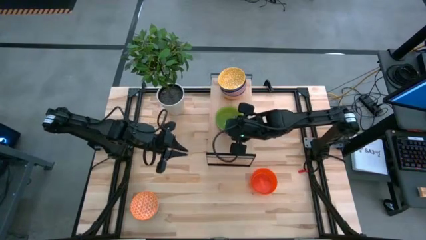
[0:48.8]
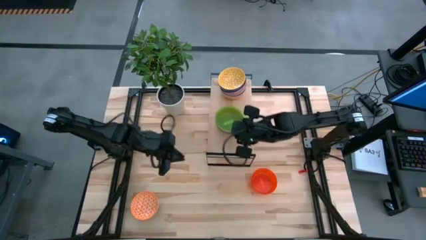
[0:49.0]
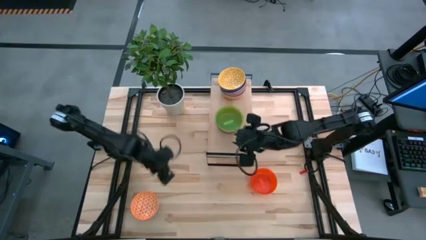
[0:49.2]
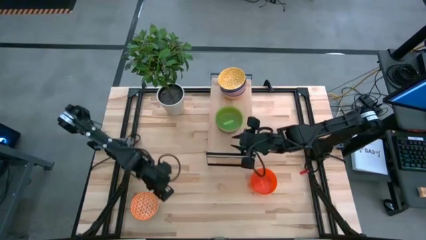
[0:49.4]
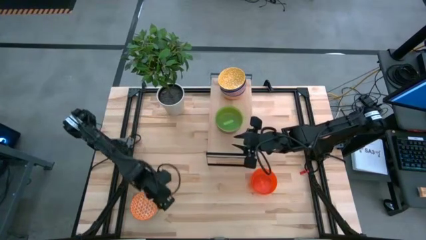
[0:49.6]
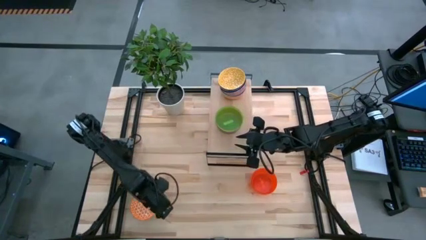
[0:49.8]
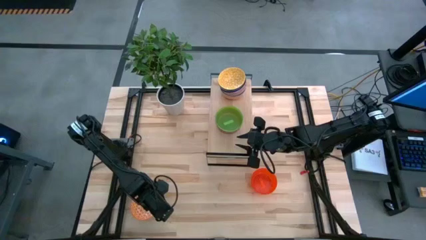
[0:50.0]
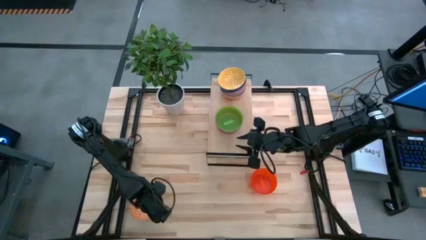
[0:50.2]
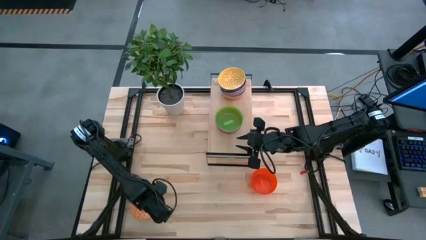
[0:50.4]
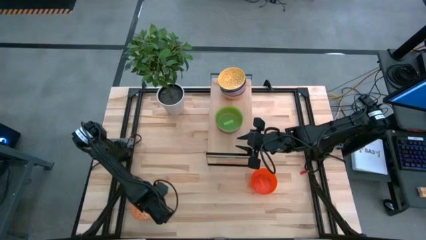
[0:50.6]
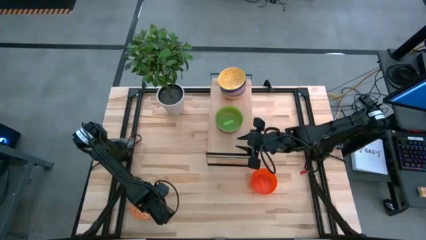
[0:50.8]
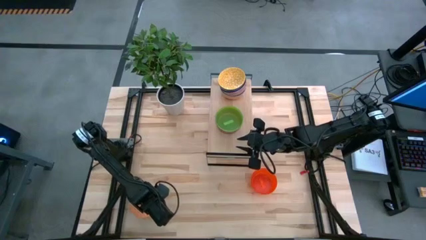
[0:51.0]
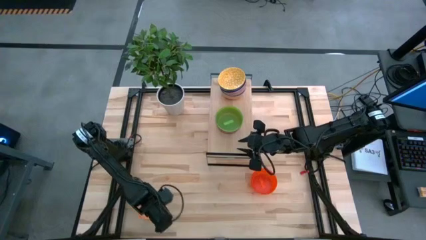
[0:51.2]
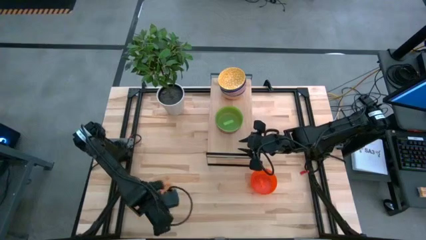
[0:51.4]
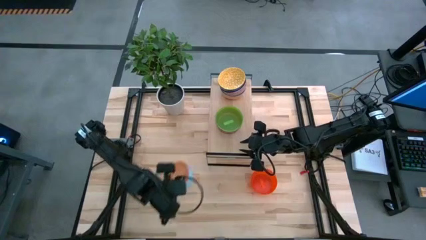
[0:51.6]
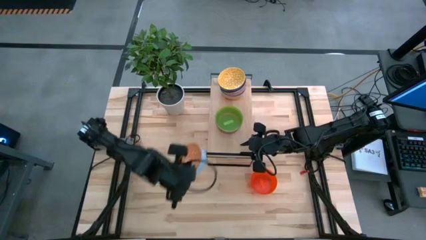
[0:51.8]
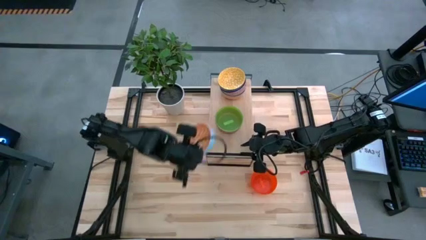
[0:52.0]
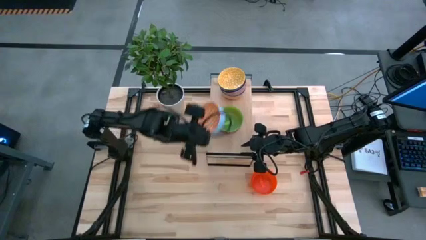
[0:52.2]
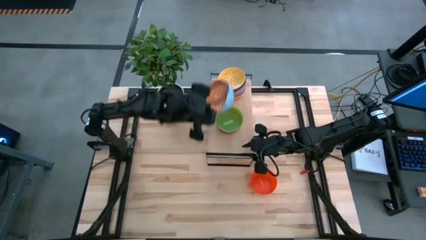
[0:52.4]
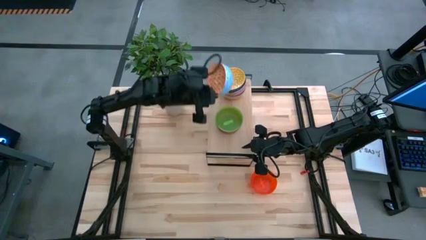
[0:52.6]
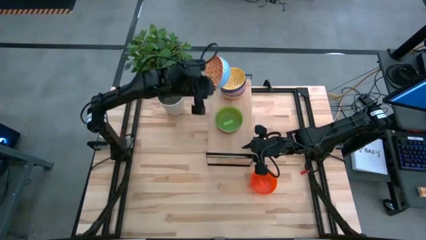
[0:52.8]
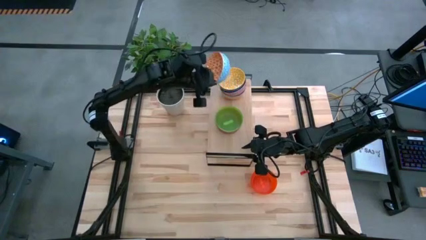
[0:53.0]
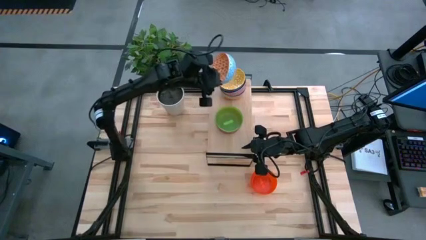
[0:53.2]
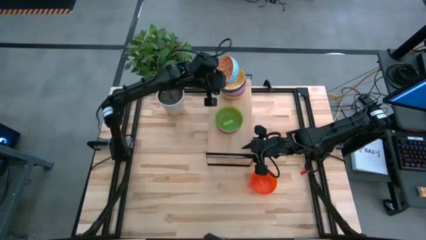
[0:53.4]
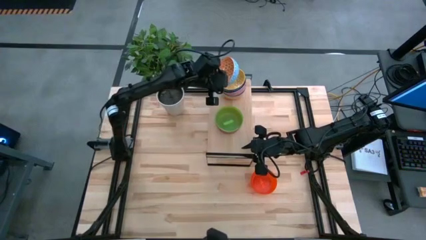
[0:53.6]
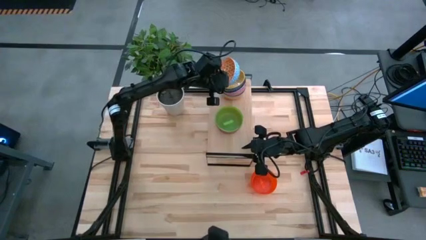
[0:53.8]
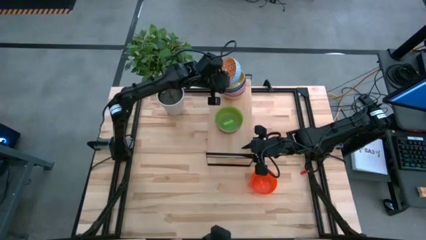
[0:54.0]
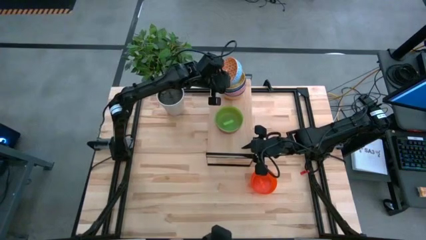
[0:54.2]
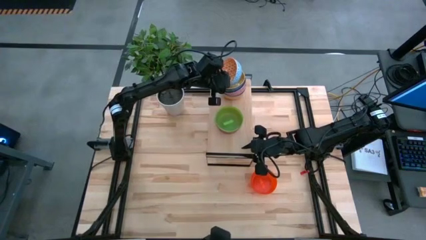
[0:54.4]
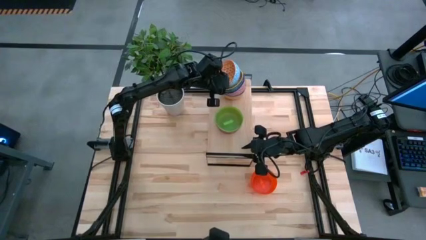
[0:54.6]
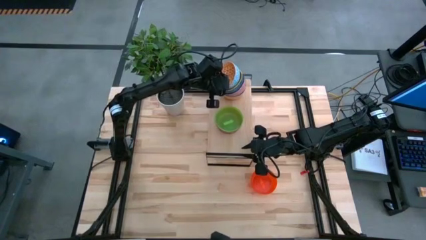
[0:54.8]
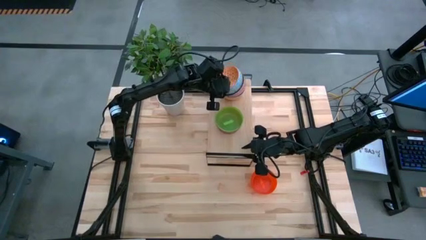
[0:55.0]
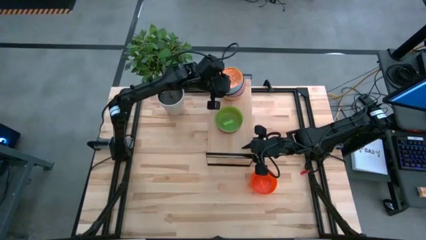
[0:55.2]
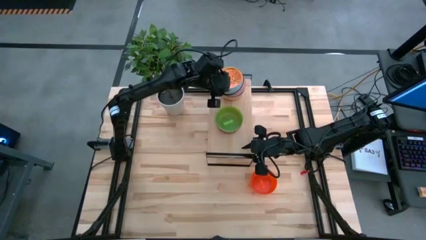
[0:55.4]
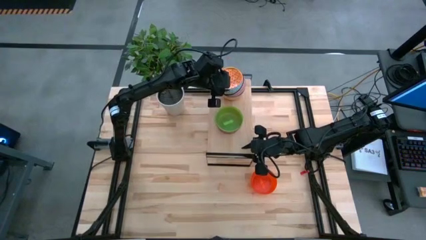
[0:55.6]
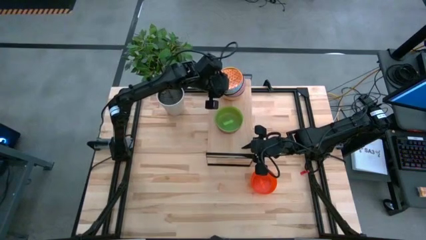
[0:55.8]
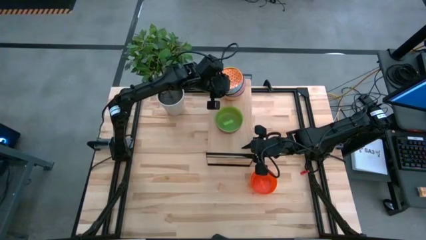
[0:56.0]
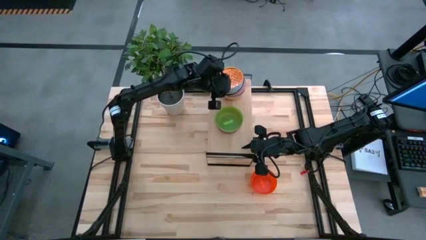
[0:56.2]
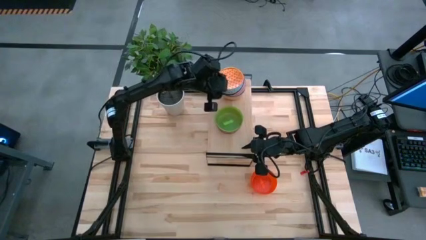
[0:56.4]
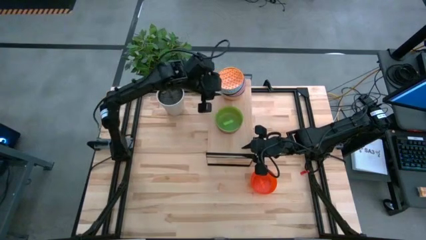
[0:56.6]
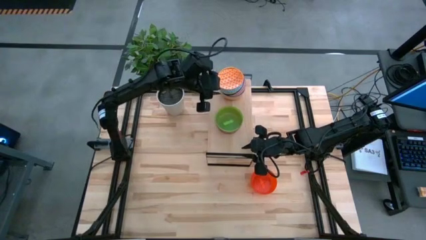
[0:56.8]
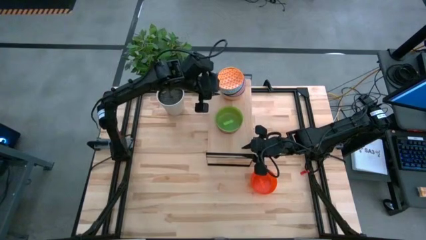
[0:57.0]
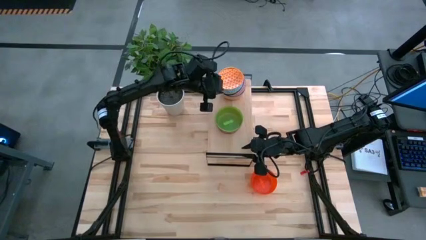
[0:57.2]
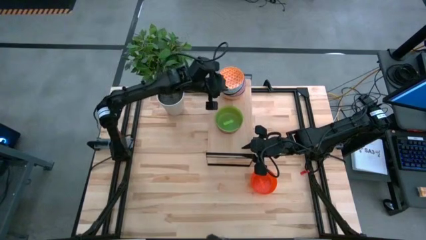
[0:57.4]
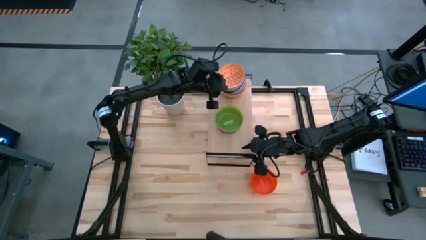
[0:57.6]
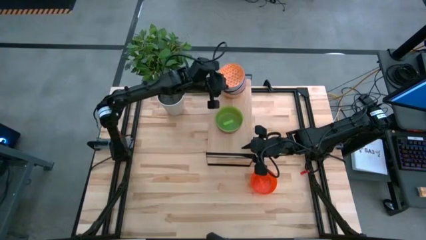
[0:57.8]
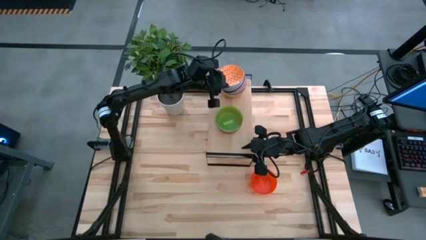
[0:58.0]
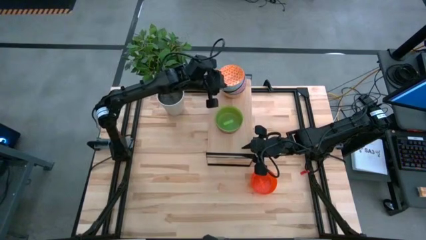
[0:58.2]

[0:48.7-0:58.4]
Task: Place and stack bowls onto a shelf
Stack the orange patterned bowl on top of the yellow patterned bowl on the shelf

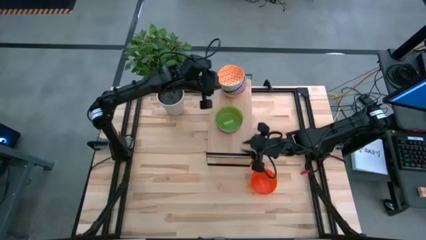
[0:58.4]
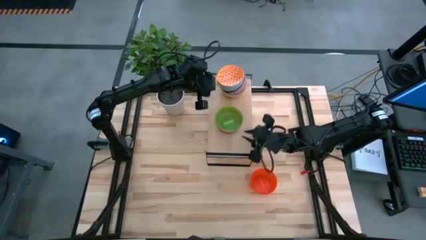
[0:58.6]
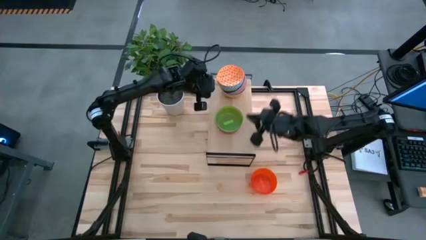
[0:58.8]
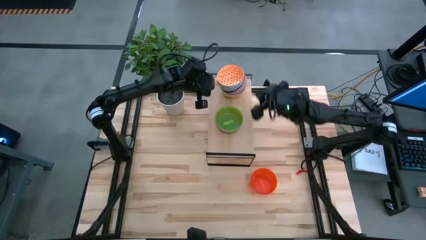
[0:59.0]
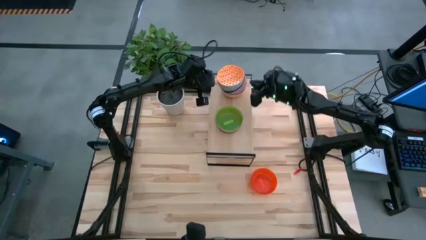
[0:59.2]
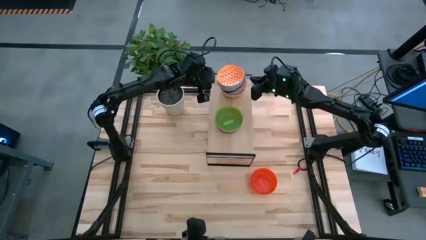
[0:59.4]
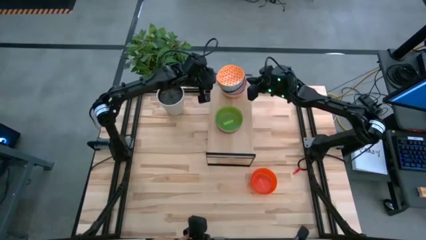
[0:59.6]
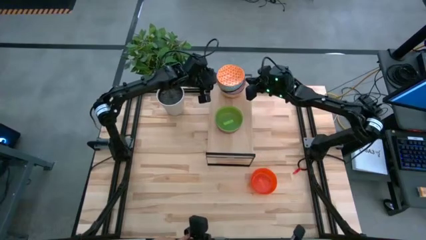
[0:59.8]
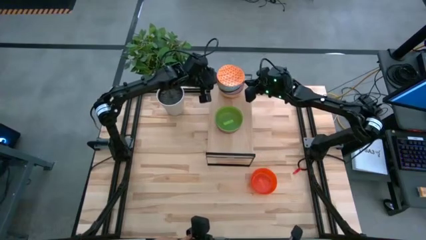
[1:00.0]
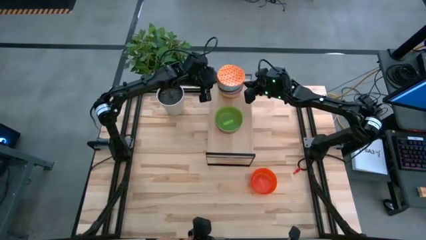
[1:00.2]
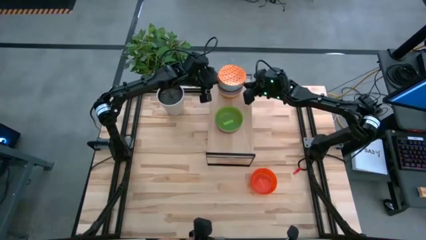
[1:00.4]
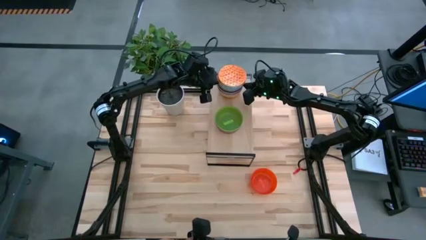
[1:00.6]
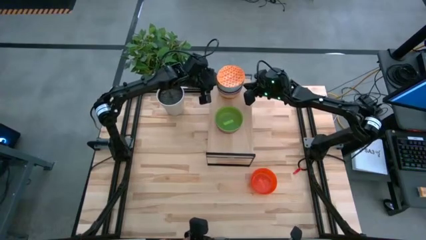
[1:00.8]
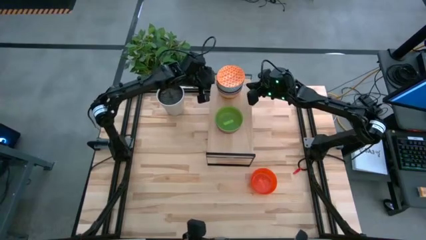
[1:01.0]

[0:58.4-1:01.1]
Adjust the stacked patterned bowls on the shelf

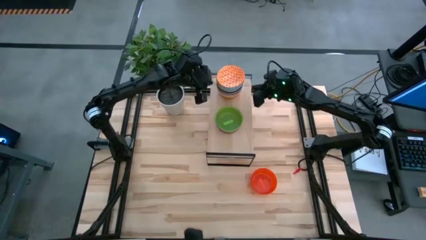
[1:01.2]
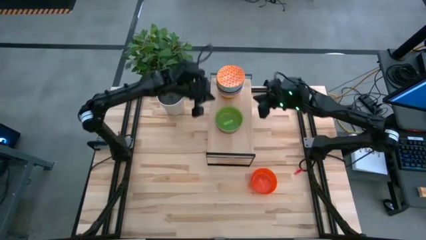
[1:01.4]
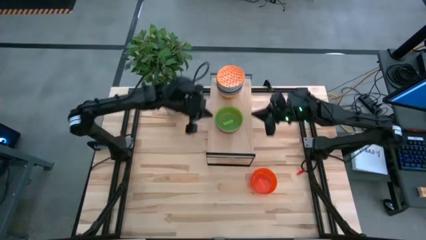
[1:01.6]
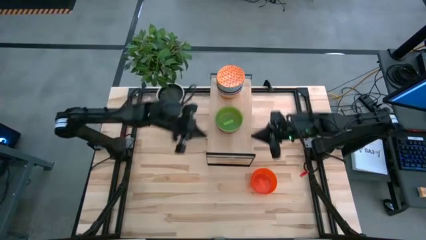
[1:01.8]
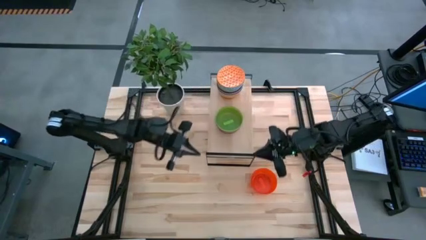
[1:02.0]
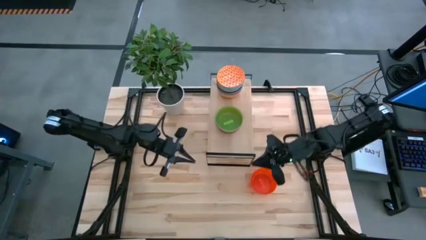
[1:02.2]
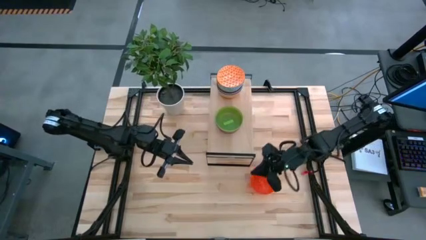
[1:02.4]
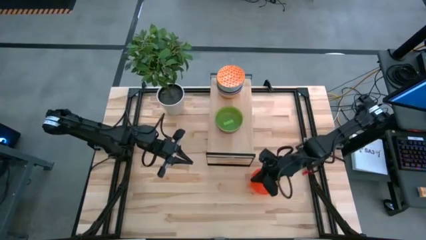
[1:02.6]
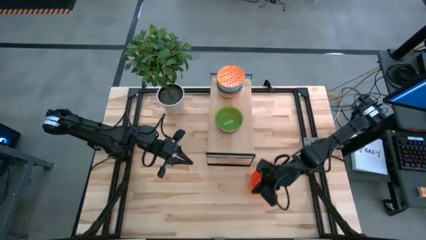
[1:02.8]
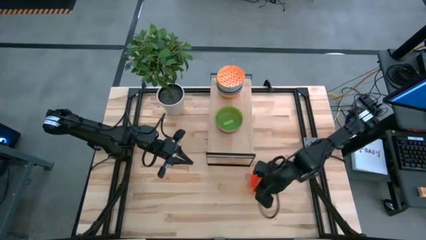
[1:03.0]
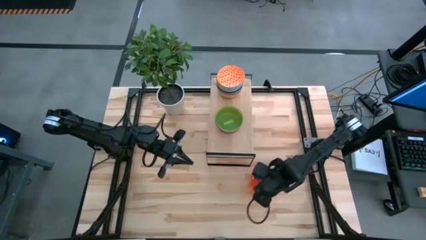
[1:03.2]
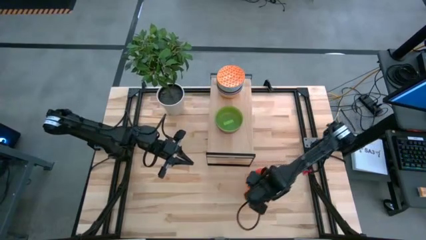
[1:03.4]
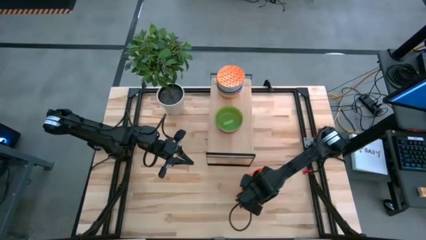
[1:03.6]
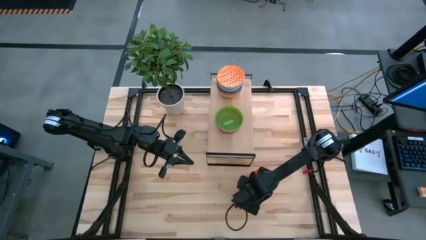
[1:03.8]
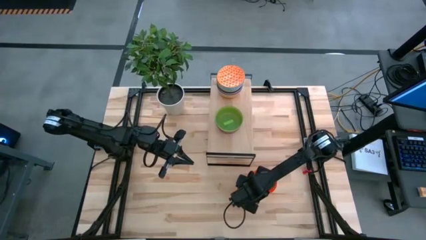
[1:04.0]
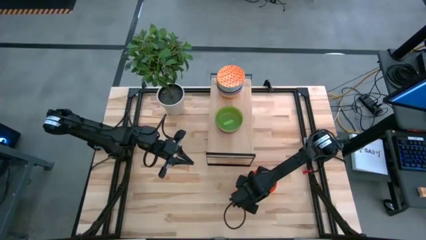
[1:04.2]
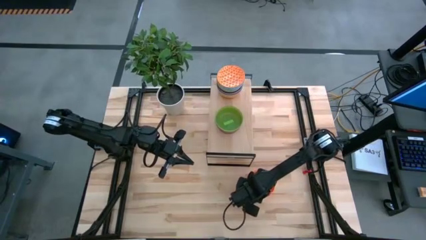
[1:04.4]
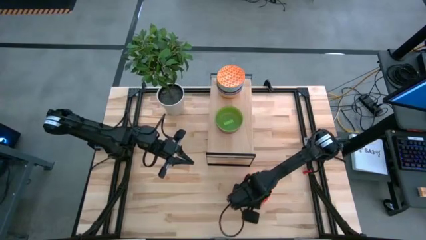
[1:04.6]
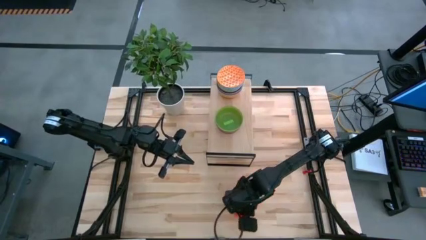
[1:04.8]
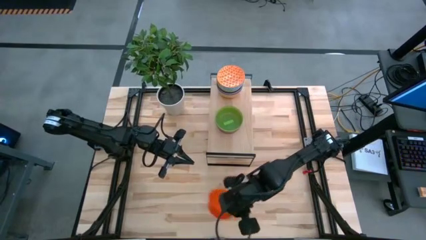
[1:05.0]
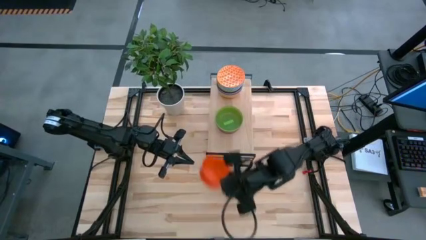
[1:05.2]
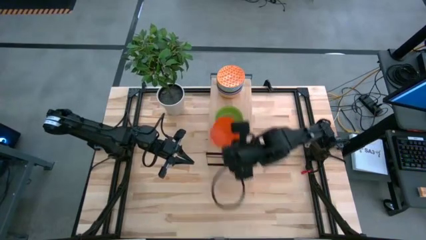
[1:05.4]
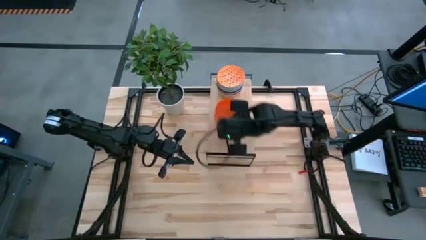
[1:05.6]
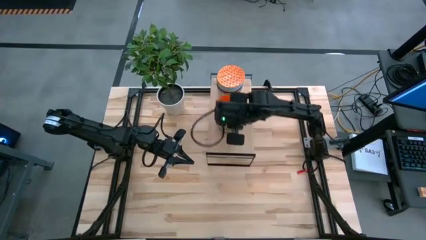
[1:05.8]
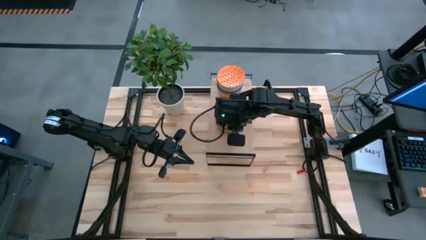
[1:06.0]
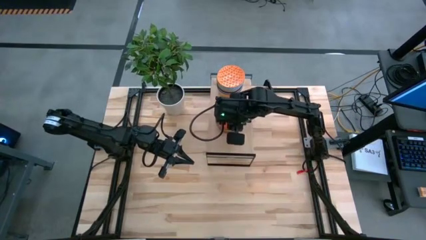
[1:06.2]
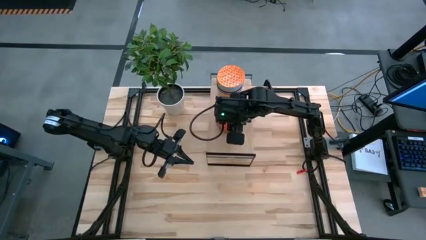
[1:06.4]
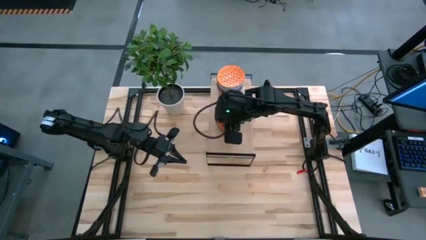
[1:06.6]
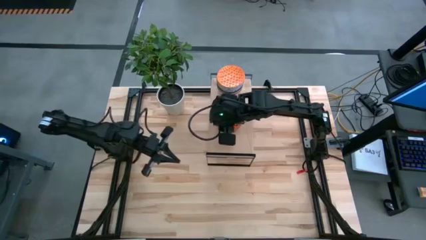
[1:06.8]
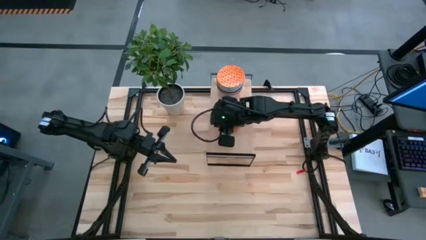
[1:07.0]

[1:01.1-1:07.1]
Stack the orange bowl on top of the green bowl on the shelf
